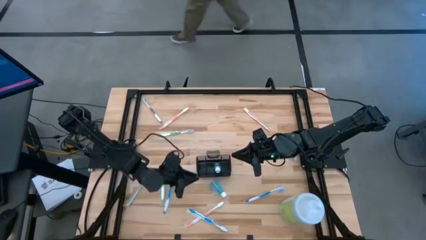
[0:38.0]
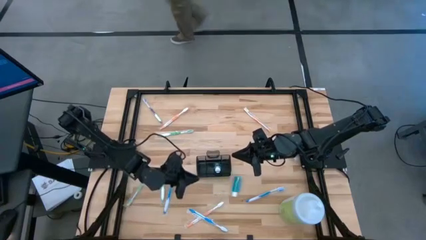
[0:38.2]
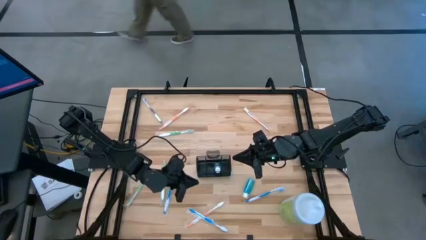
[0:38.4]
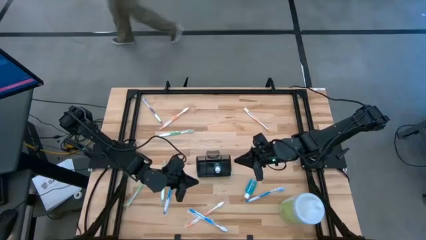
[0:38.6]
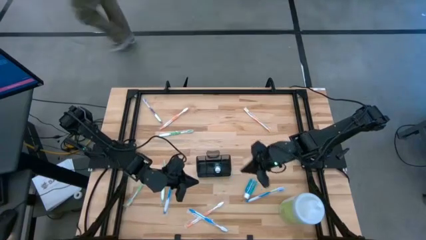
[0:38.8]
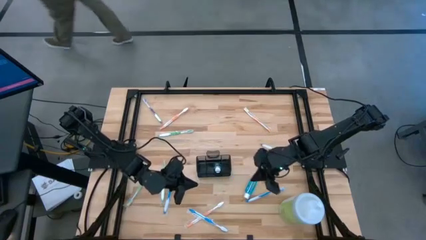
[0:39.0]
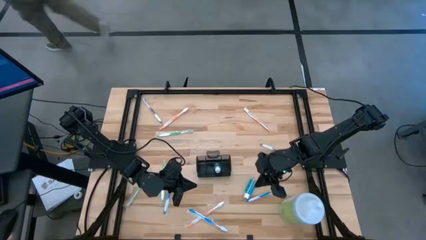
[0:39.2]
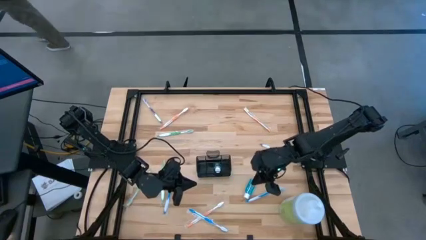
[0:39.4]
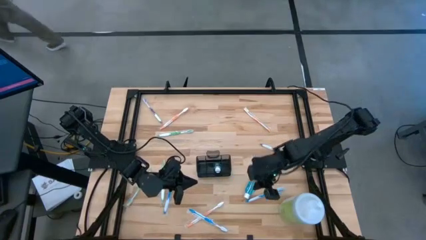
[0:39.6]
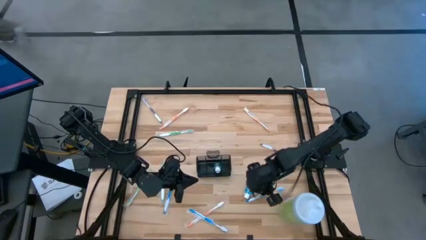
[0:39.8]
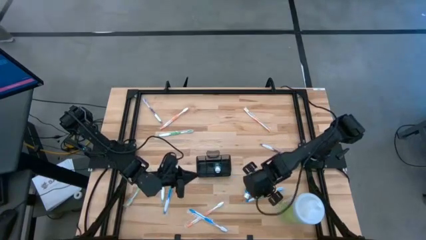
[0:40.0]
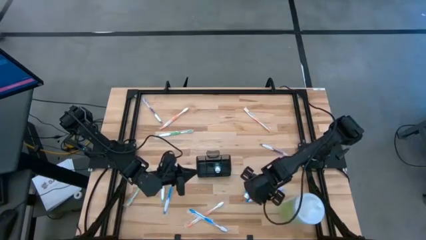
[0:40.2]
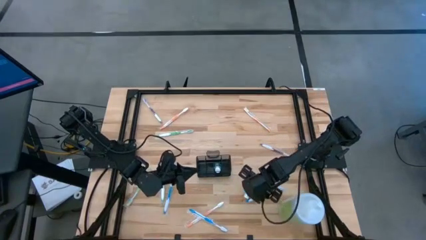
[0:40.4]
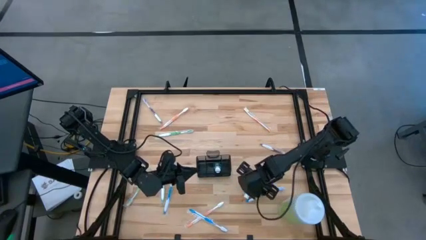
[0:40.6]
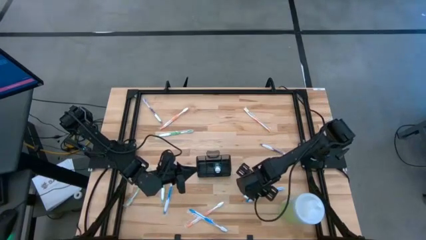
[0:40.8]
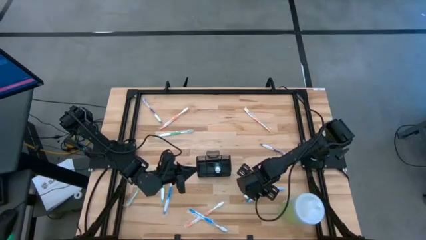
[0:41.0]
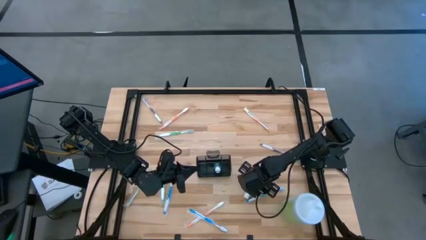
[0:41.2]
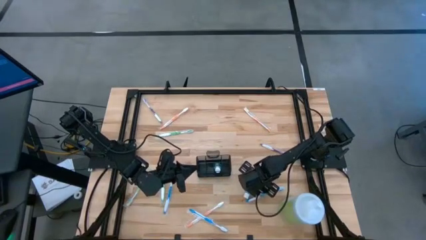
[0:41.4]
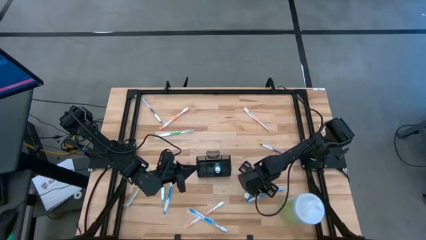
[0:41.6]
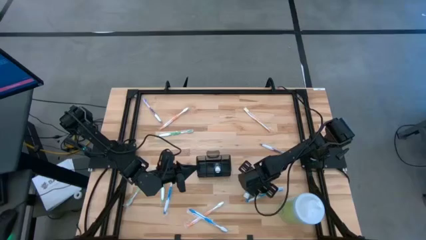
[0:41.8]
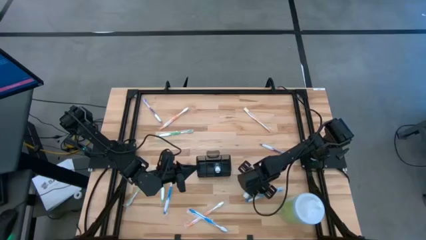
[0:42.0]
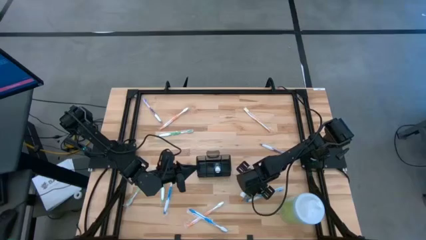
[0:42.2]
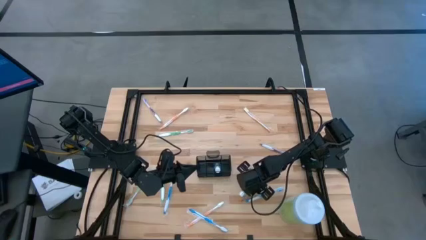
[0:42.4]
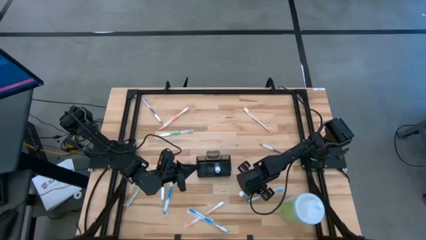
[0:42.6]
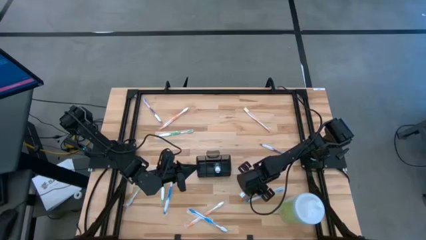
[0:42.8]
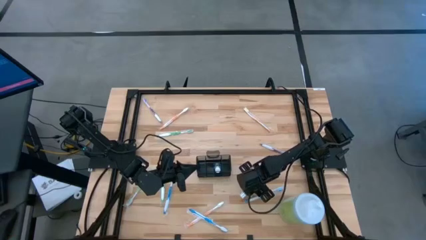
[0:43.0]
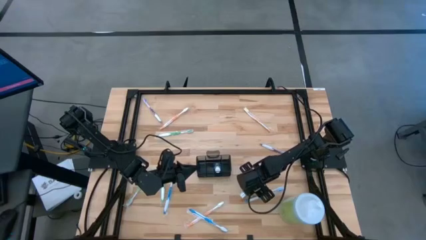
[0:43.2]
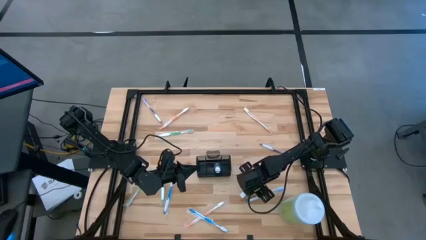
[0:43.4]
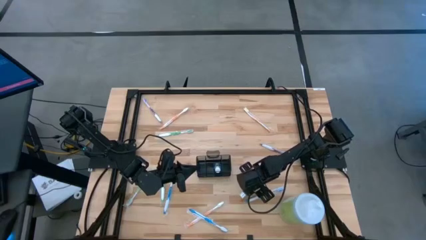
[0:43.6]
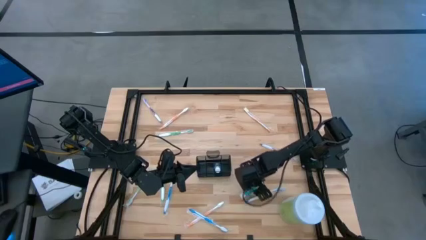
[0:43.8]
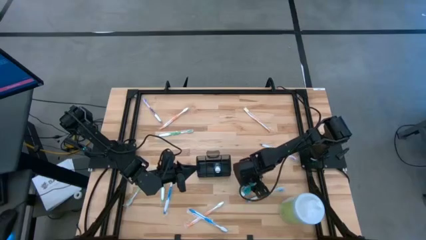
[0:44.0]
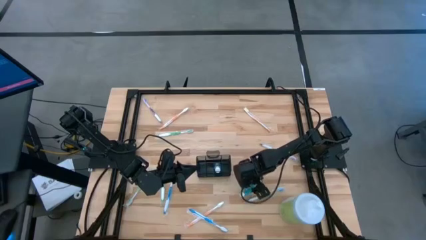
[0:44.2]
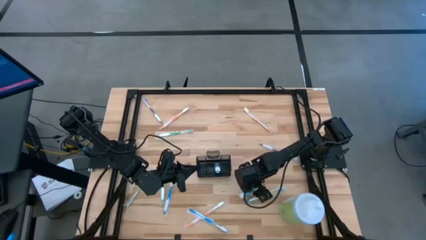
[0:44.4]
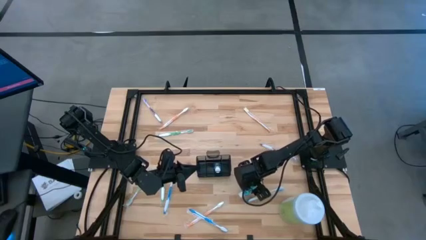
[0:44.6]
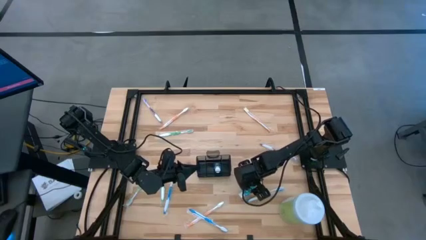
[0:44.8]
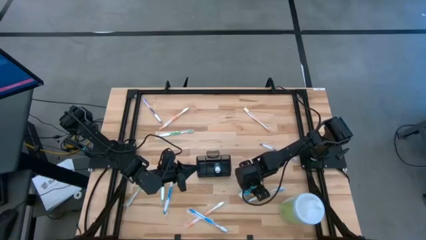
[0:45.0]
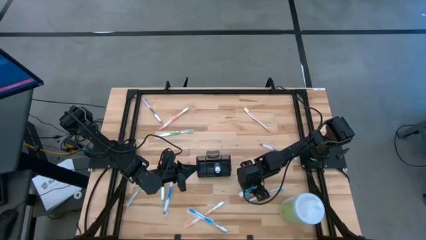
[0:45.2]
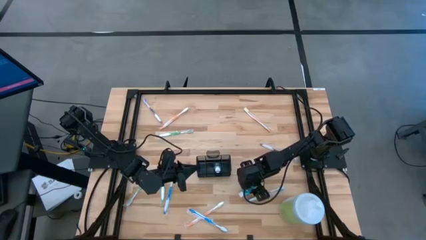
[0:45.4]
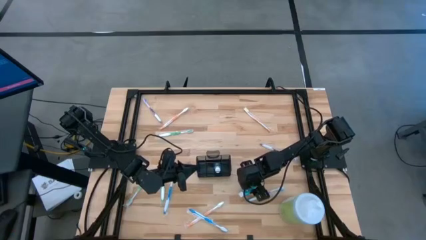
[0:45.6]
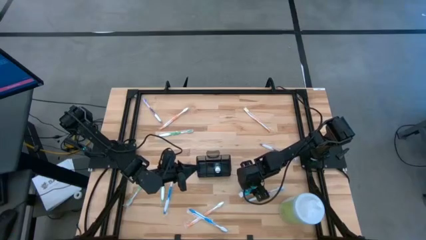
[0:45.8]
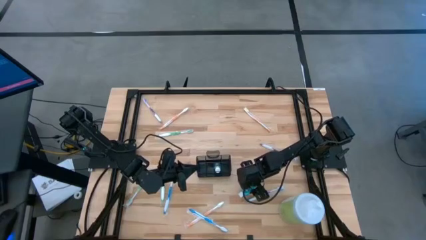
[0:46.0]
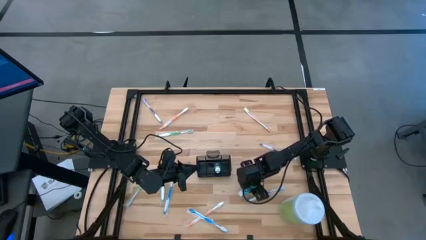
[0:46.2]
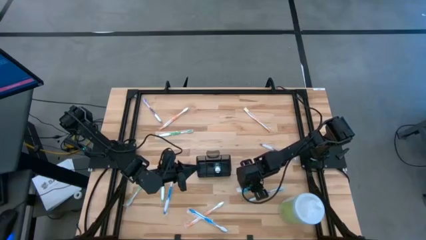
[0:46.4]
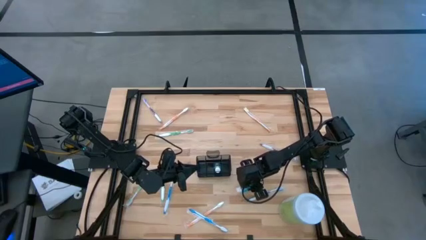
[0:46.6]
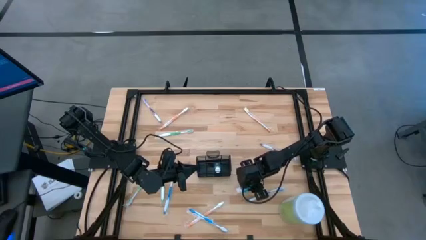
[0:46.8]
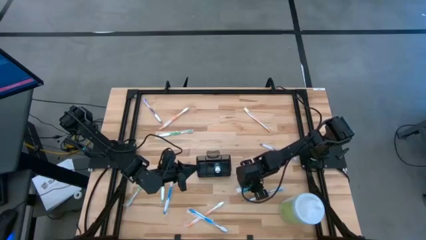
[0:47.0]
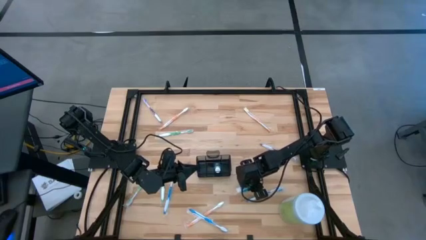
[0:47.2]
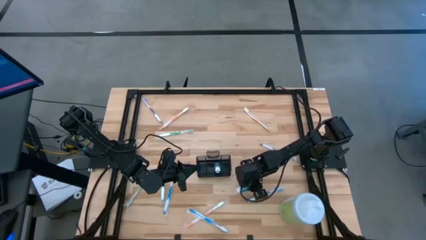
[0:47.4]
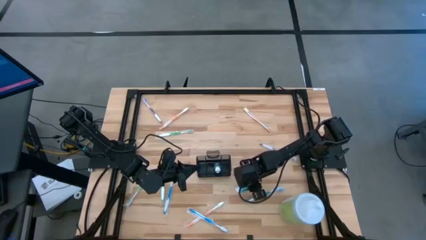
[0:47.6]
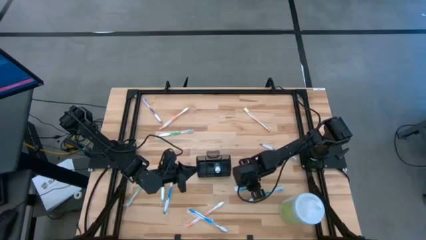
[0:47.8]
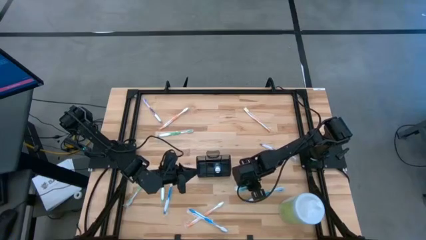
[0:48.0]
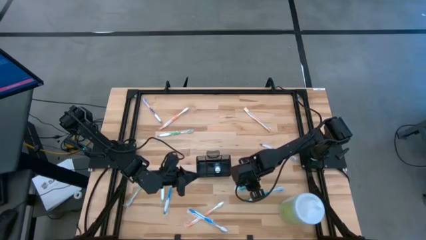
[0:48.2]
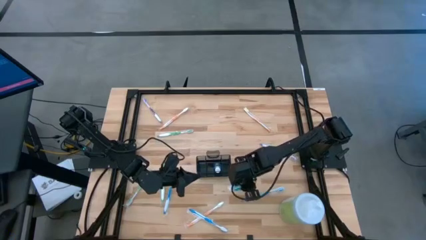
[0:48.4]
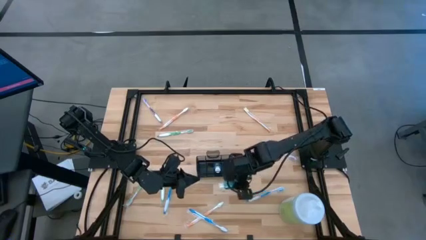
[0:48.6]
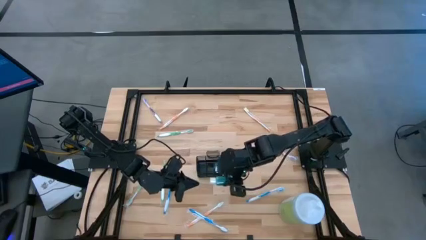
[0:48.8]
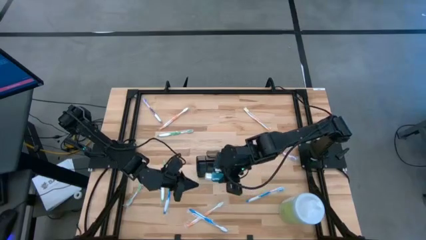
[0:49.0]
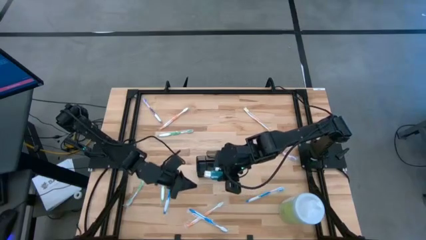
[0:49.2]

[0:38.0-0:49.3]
Task: Pick & Place toothbrushing station
Put the mouthwash into the middle section of the mesh organizer
